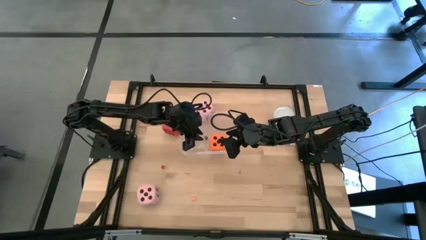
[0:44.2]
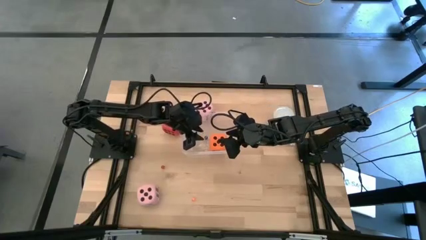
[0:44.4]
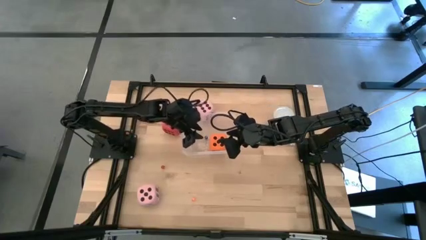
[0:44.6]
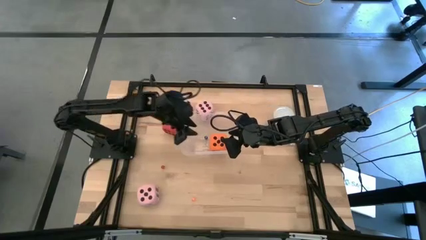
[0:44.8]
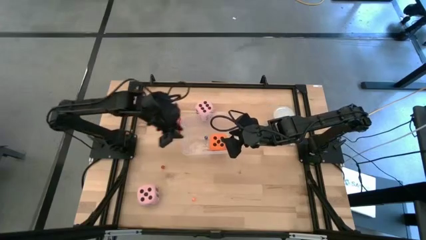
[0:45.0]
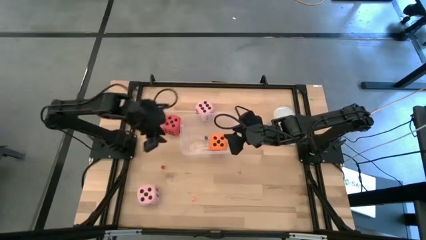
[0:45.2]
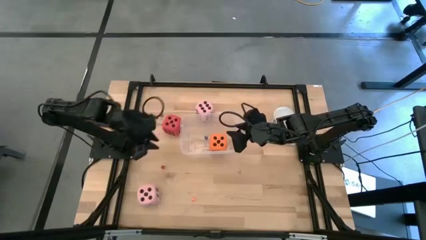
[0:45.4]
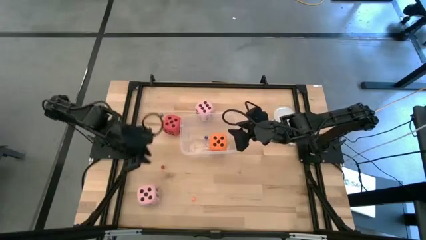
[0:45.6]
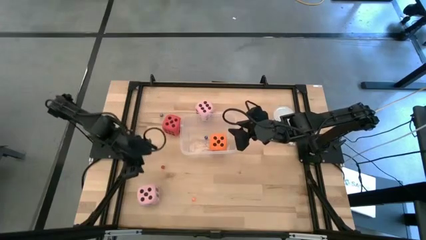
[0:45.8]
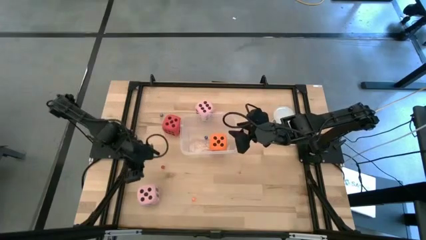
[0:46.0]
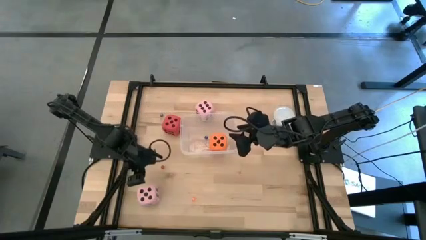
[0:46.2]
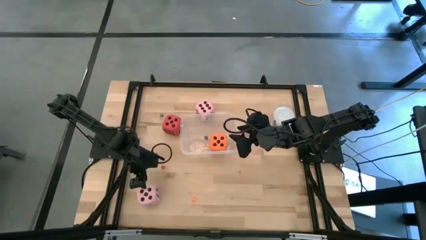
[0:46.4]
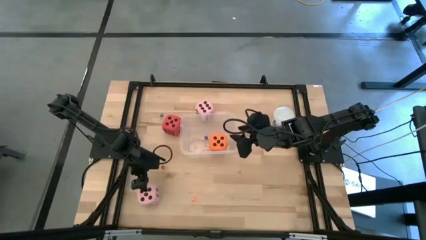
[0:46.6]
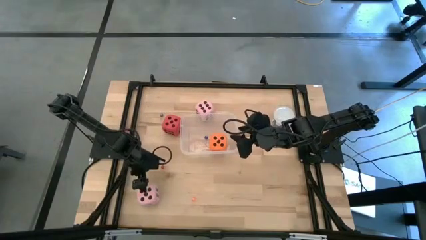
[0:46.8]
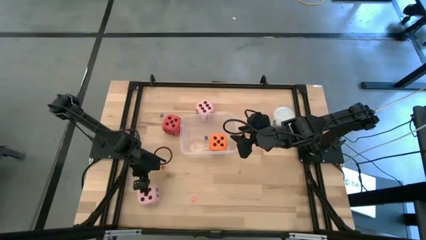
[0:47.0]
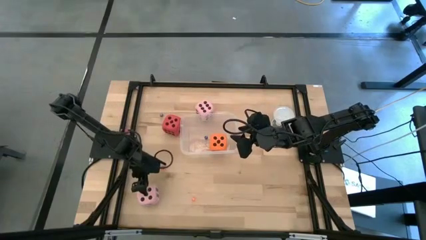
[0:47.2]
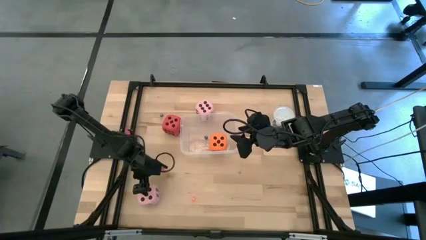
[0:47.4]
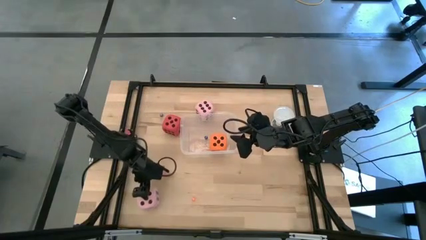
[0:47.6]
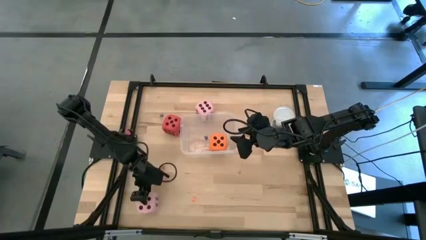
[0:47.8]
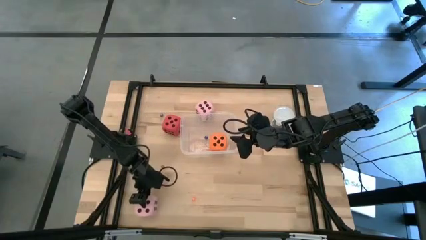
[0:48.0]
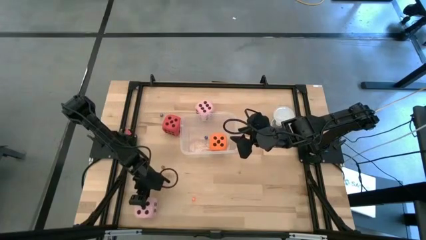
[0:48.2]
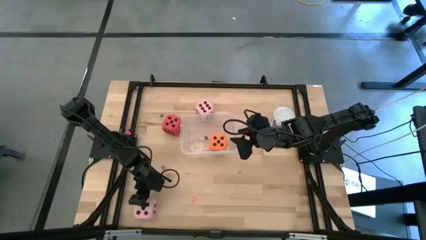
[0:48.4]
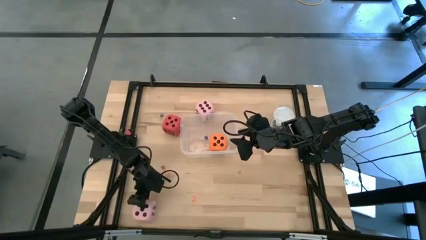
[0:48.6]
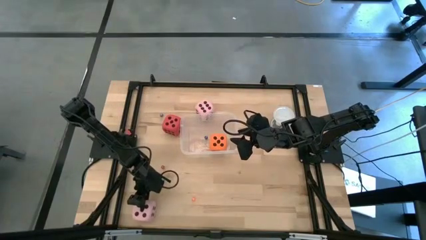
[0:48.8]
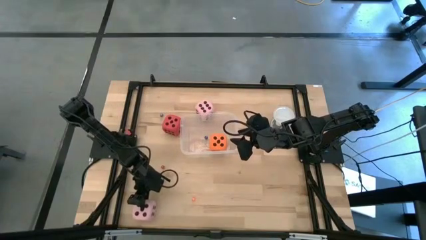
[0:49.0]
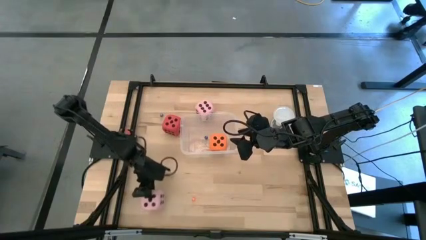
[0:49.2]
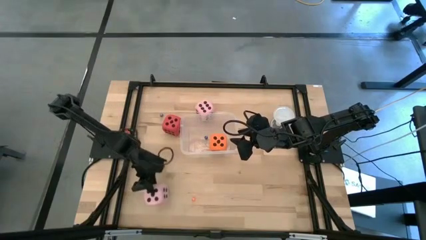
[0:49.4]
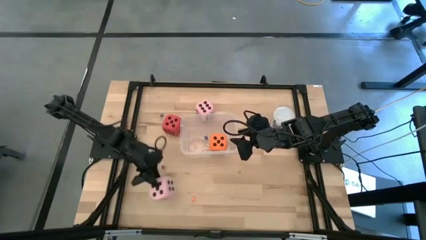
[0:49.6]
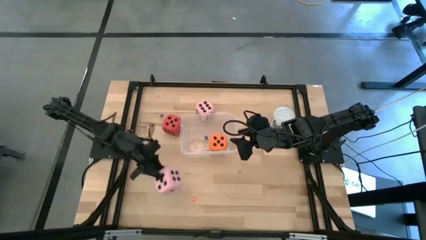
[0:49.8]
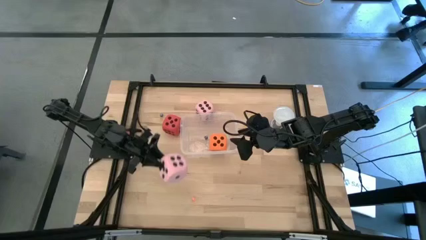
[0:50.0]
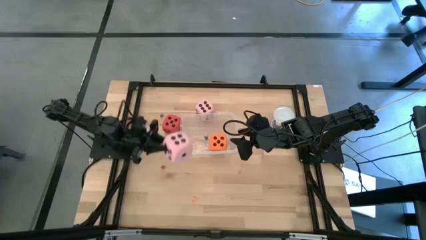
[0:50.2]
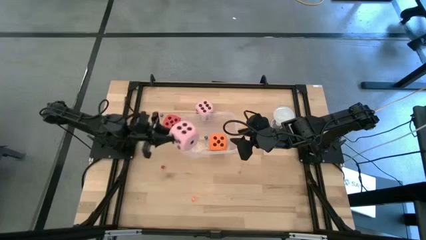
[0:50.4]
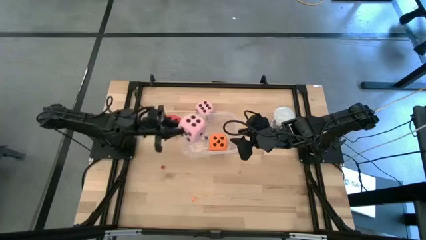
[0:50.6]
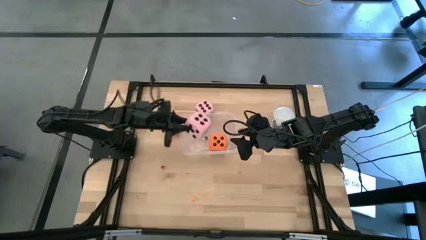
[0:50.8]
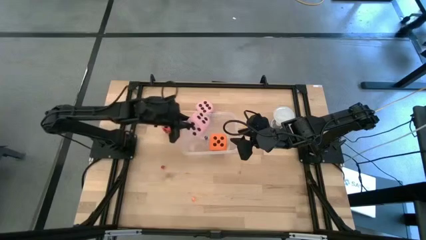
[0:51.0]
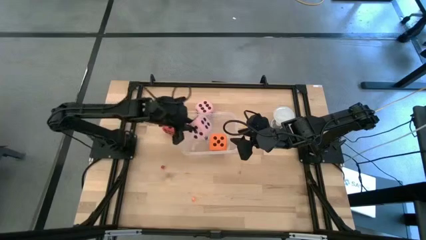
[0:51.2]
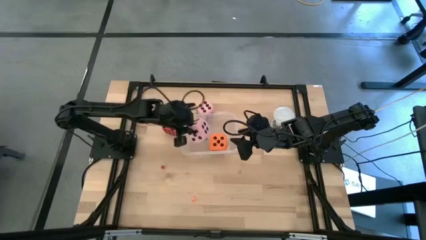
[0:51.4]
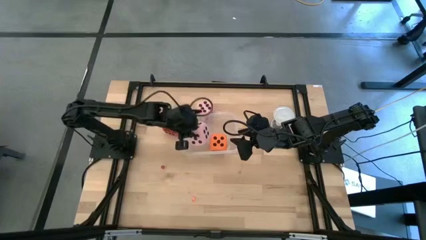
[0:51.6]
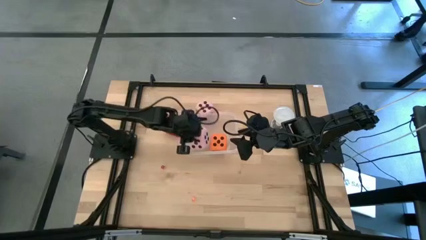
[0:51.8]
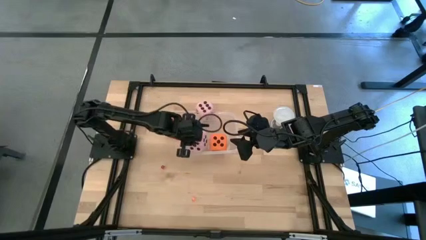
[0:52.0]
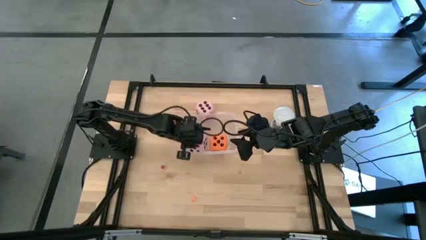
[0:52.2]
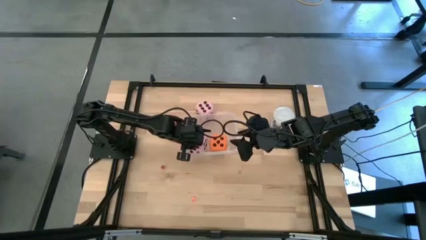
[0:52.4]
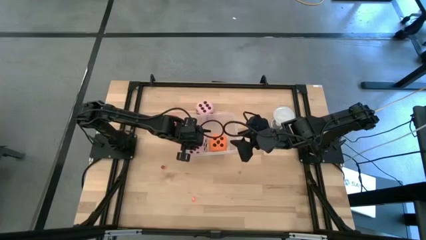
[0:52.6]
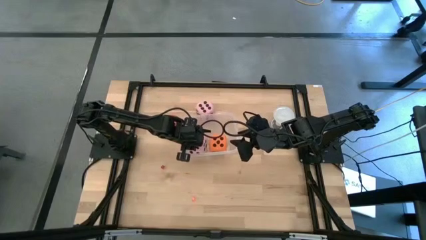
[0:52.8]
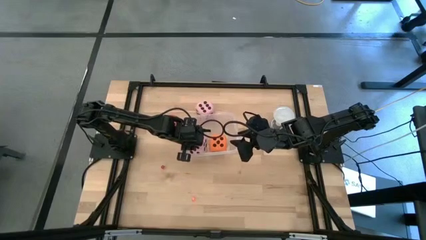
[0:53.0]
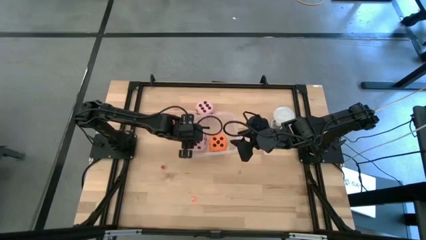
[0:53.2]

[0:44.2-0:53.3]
Task: Pick & Place Dice
Put the bottom large pink dice into the transparent bin

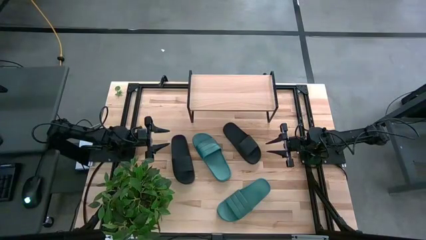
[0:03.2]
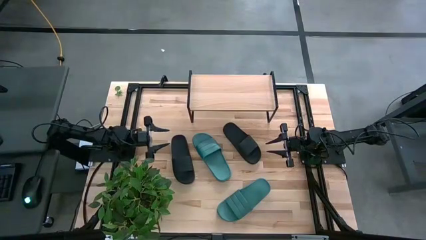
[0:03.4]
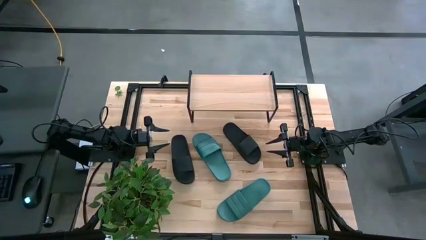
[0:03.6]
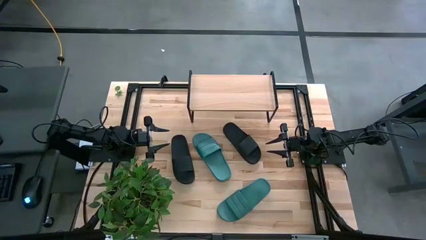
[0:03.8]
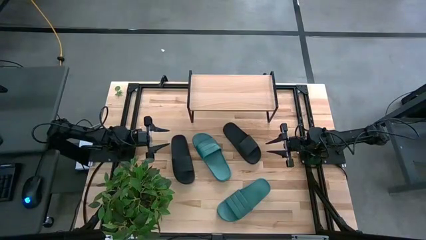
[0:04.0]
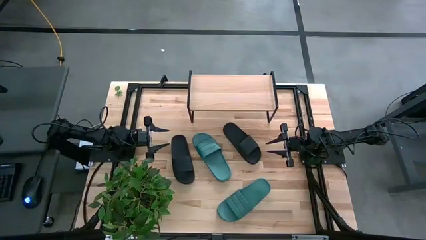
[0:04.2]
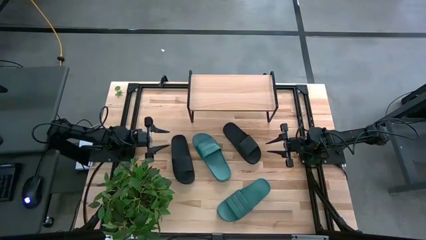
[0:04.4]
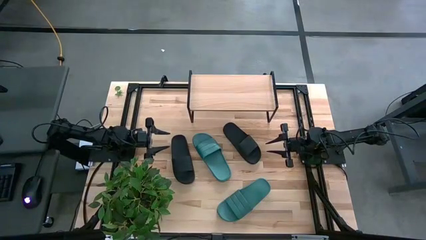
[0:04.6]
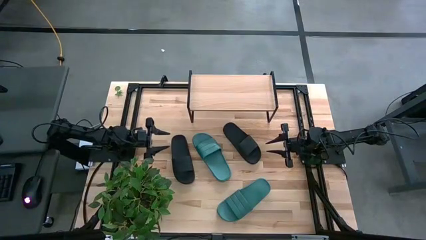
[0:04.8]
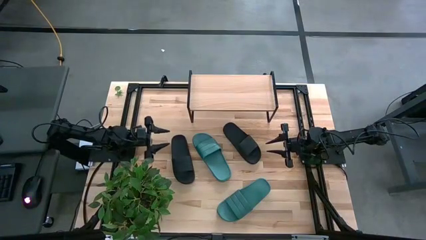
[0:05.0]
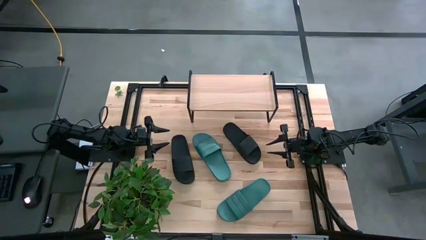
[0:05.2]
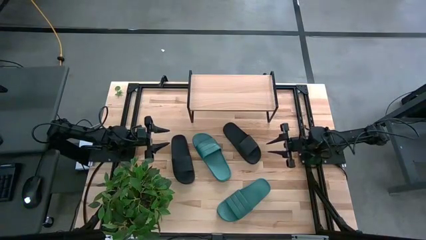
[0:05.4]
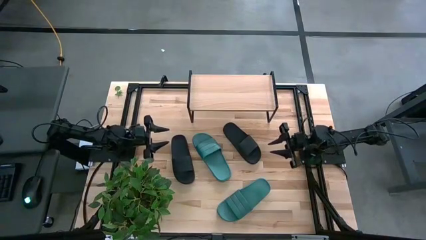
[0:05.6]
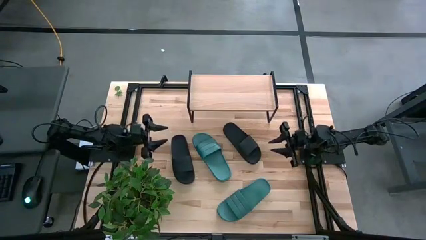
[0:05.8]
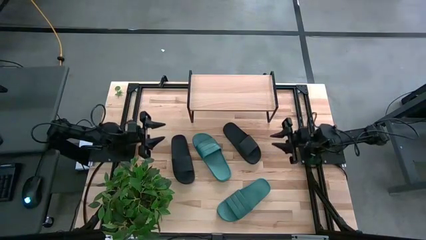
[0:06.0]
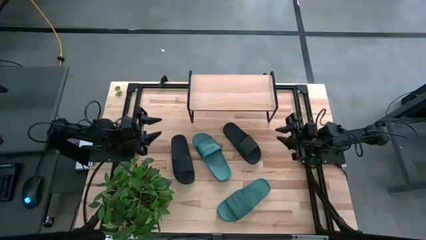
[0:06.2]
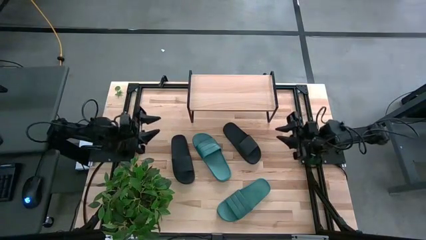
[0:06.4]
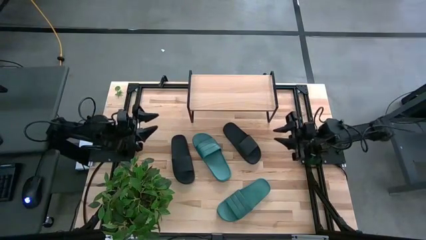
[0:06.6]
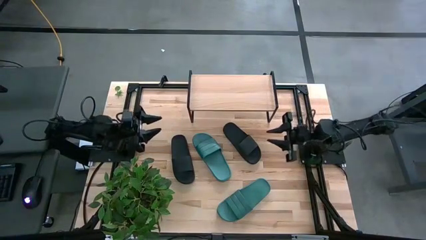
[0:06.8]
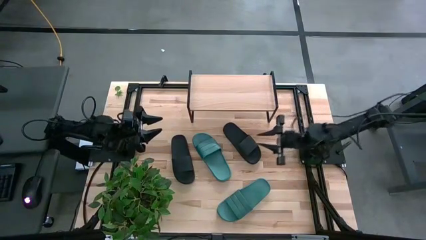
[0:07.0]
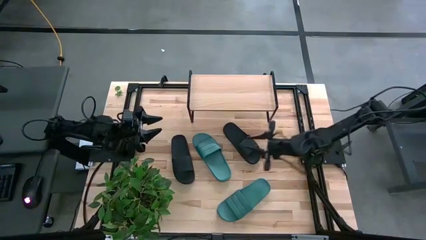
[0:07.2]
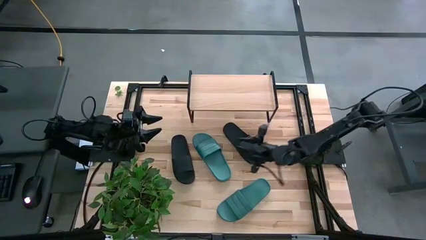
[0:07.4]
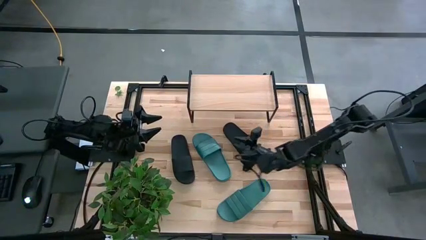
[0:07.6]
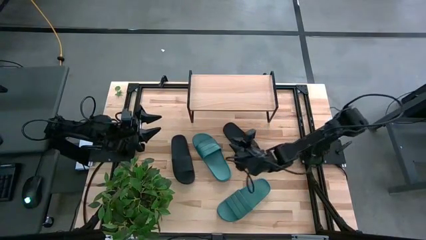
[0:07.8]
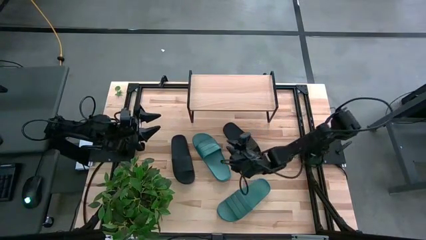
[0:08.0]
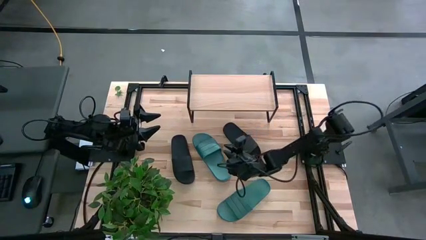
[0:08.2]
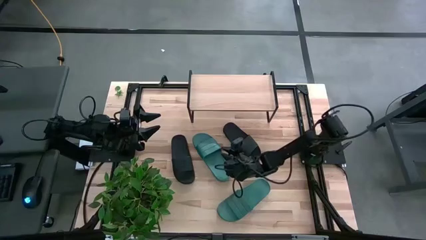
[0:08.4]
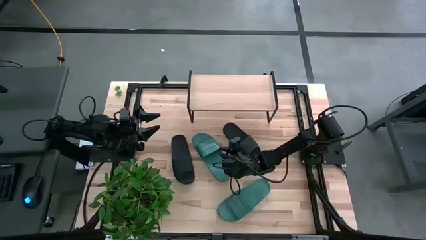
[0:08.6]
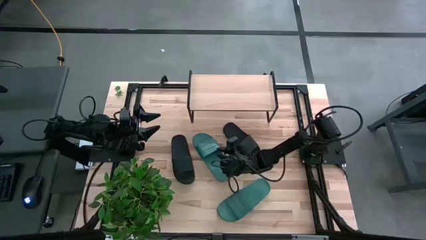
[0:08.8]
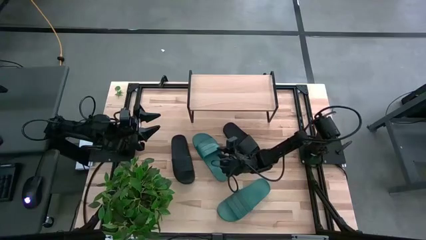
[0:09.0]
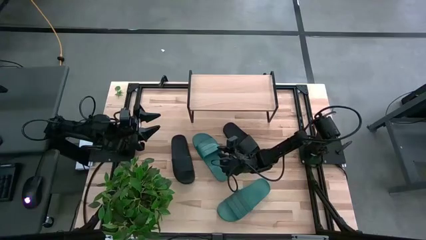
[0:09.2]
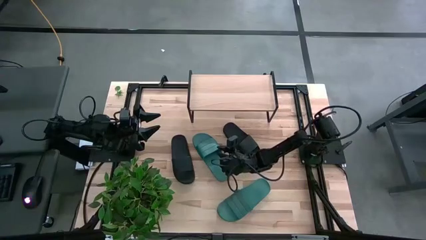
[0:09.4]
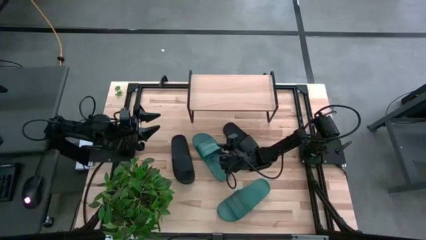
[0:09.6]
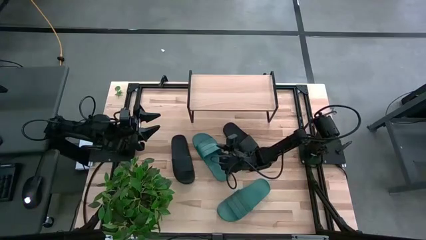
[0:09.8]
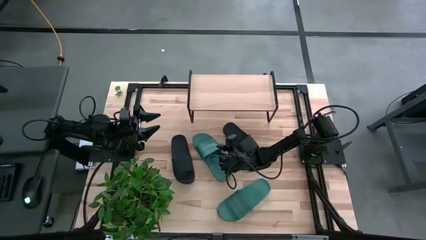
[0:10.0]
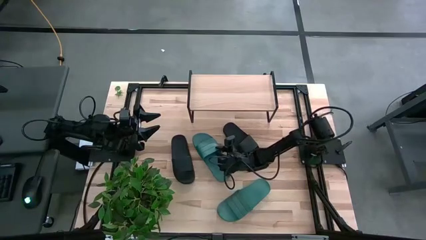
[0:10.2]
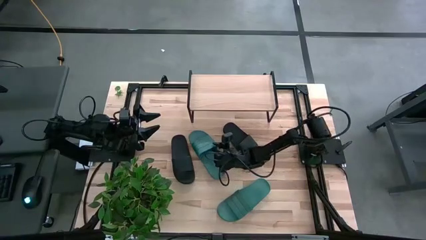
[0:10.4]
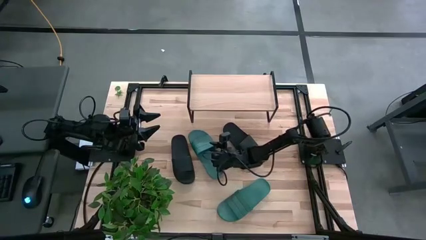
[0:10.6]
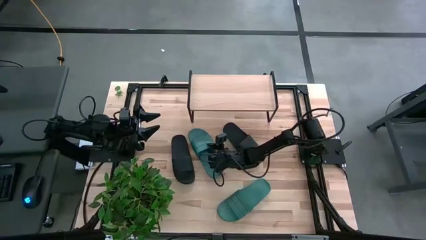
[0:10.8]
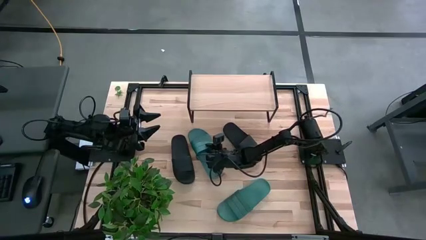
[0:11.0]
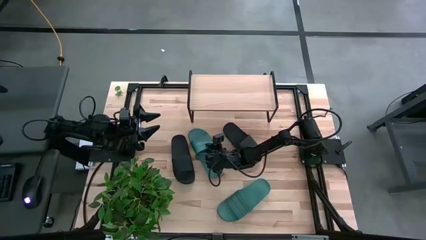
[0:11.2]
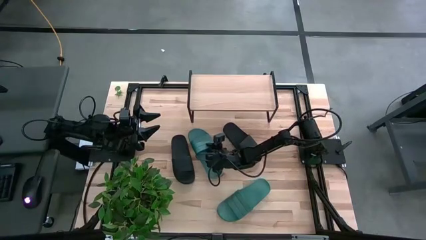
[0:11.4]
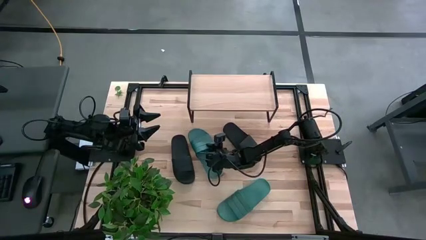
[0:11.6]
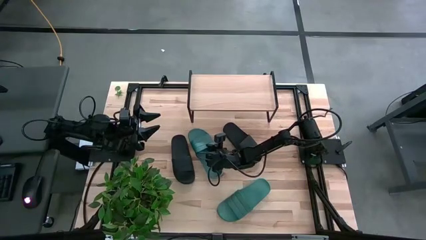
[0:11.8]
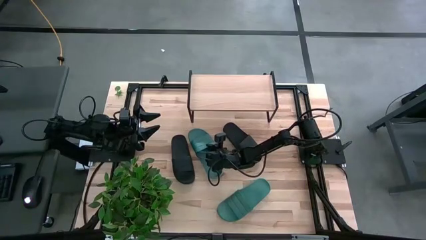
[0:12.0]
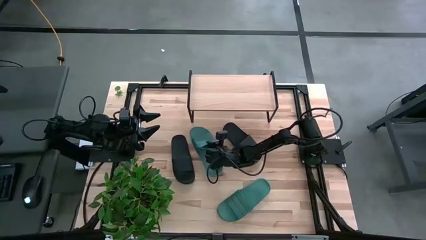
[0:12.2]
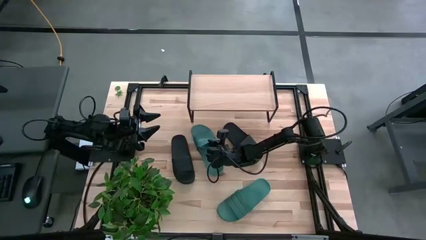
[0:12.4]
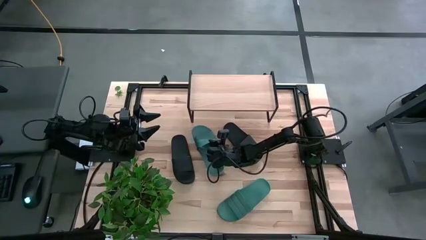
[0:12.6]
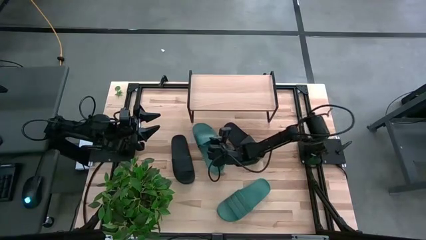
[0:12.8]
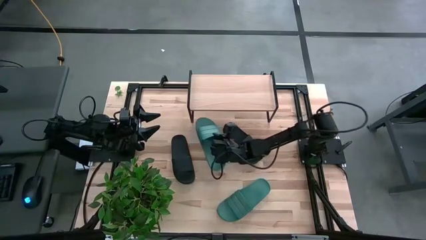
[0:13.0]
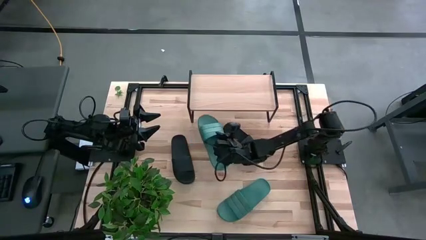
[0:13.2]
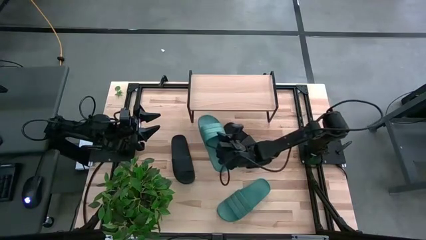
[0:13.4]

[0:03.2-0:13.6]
Task: Pick and place slides into the shelf
Put the top blue slipper on the shelf
